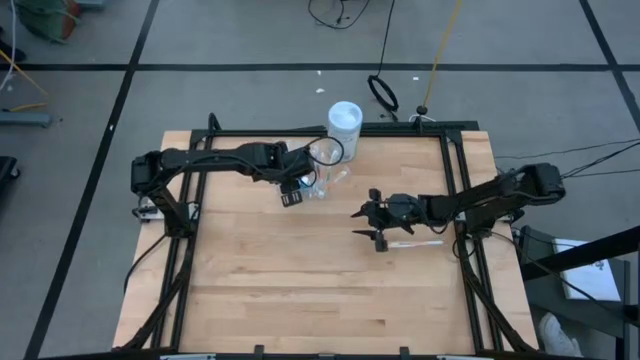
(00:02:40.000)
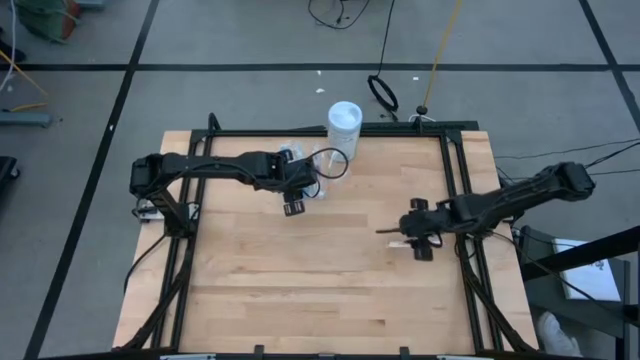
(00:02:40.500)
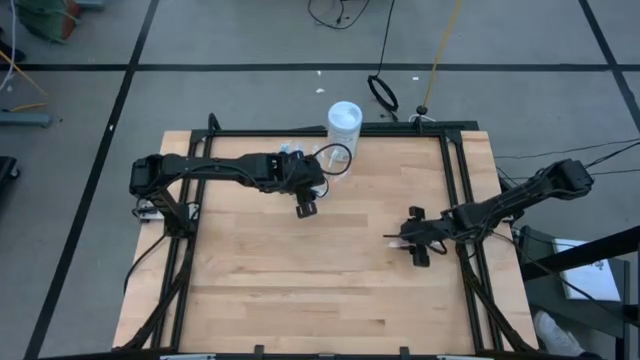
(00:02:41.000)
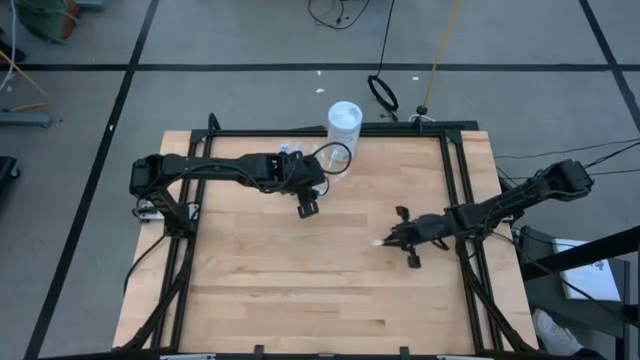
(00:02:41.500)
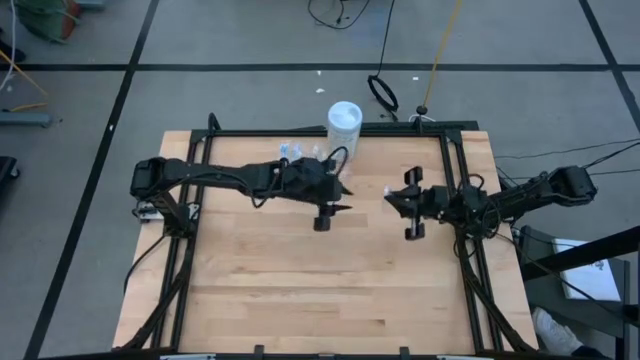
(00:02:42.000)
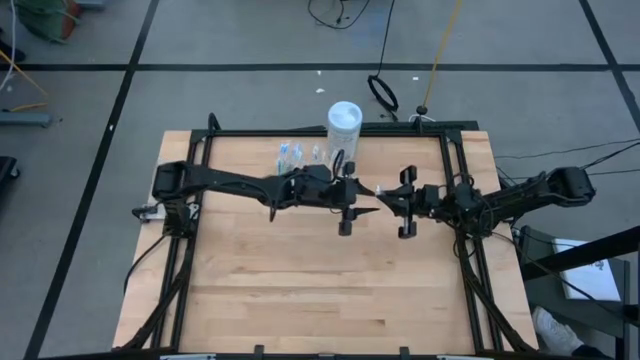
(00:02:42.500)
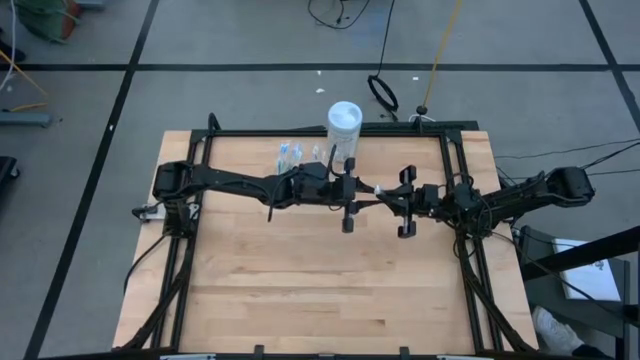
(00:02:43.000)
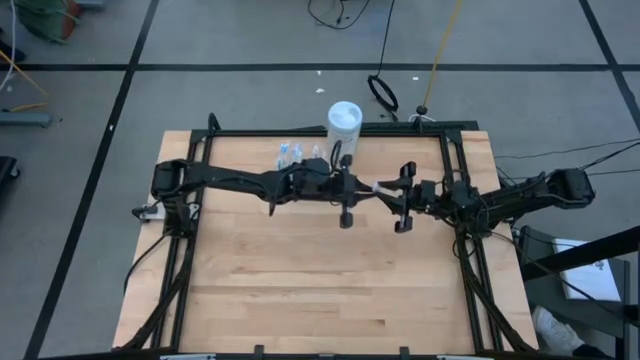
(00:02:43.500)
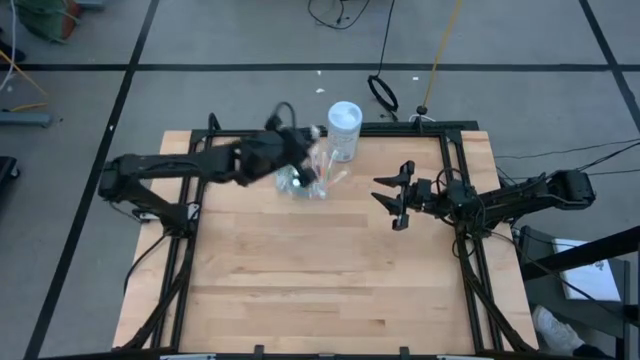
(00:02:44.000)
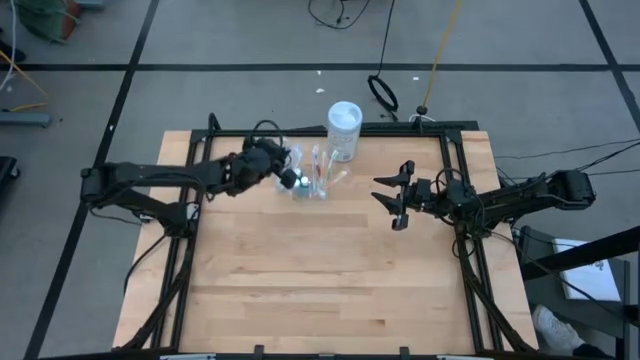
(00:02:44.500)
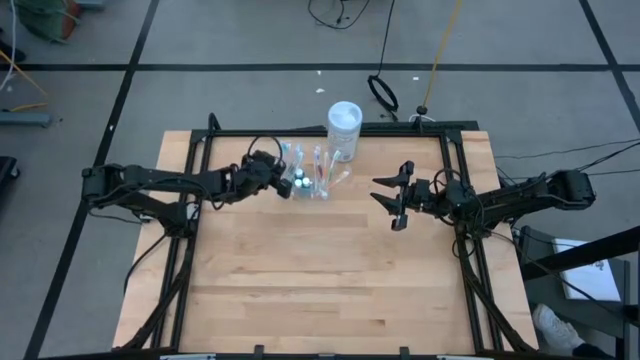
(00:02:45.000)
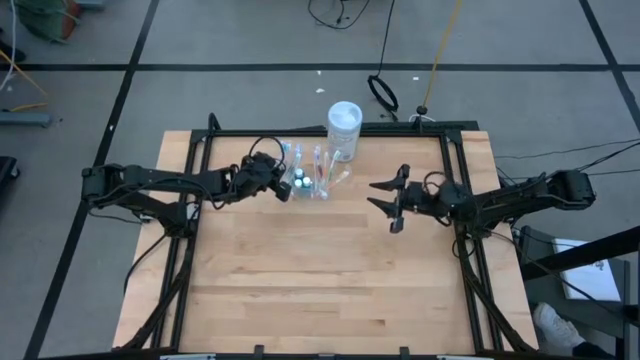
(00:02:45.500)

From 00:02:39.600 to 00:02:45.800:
Task: Pick & Place toothbrushing station
Put the orange toothbrush into the transparent organizer

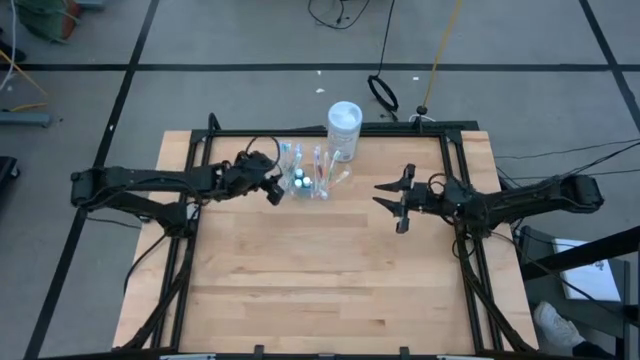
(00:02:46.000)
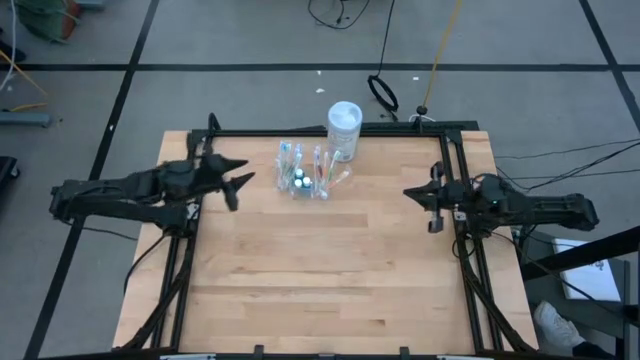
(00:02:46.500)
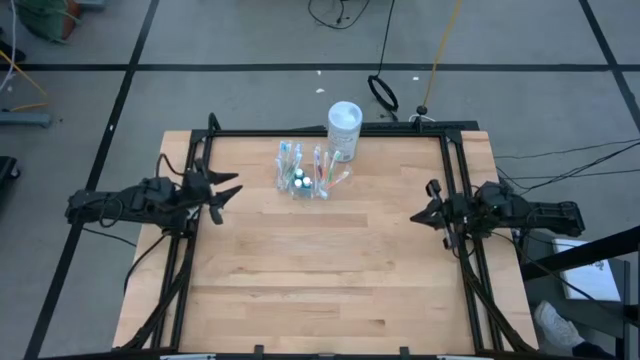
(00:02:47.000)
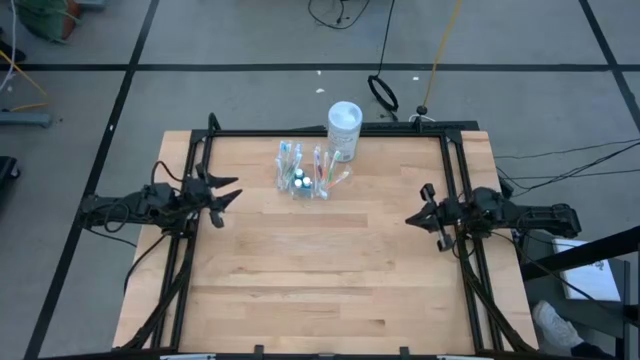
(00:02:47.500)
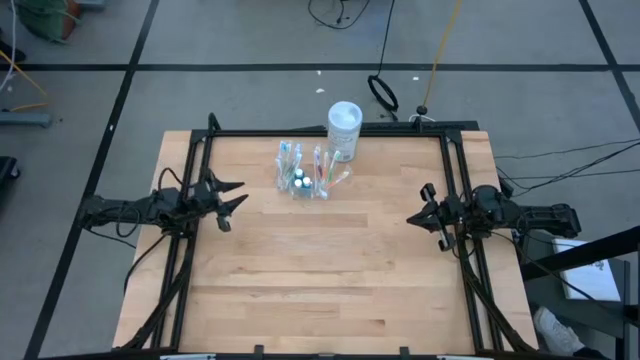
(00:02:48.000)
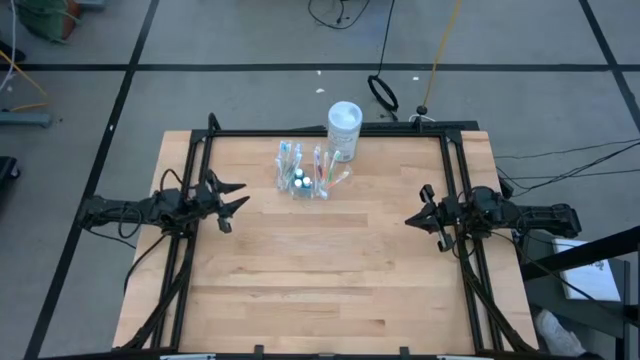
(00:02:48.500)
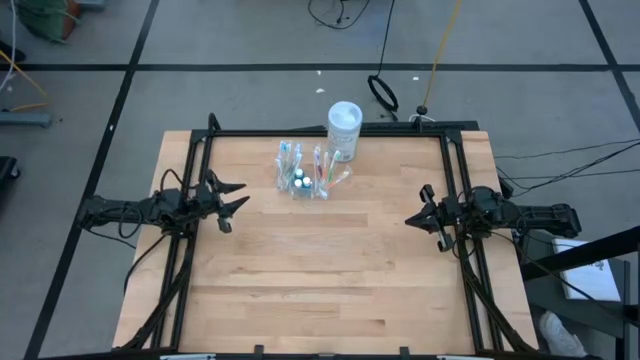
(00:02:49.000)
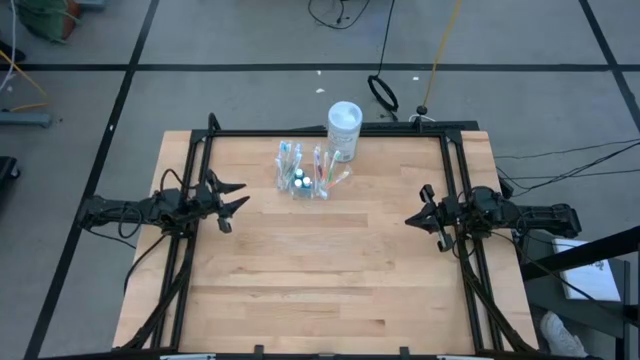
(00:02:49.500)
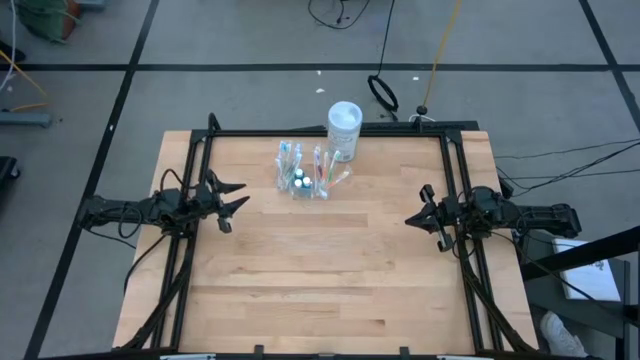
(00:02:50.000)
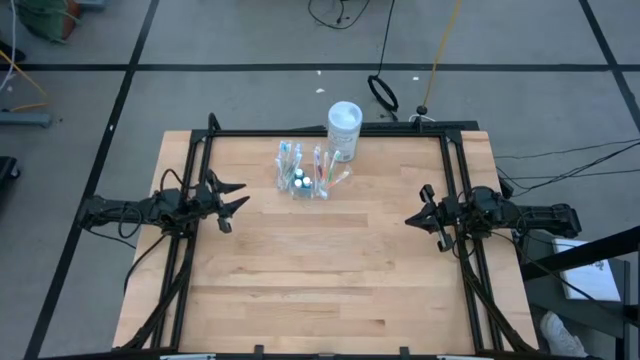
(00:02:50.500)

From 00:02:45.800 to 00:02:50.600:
Return to Home Position

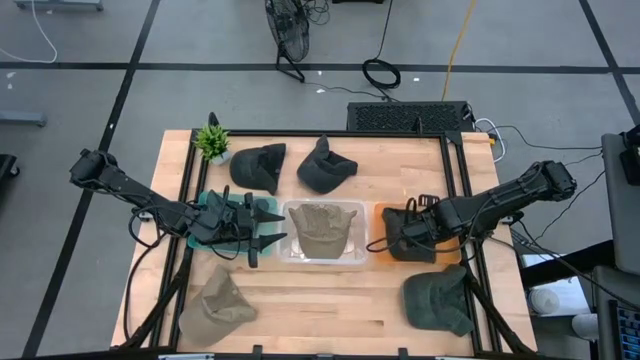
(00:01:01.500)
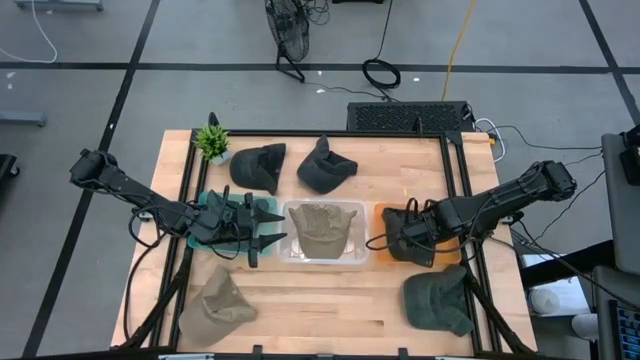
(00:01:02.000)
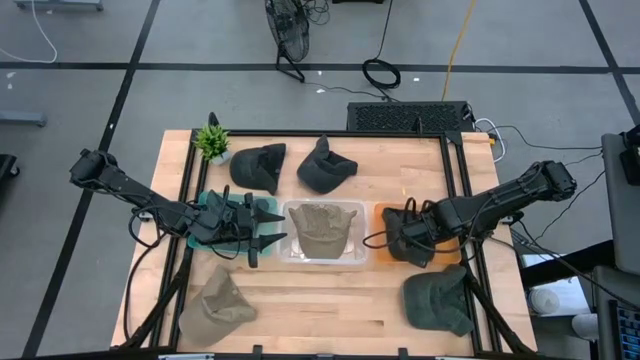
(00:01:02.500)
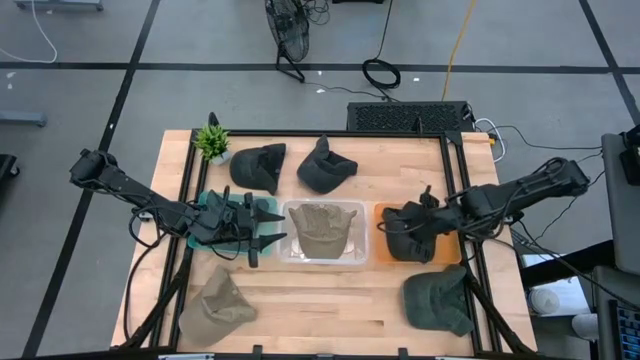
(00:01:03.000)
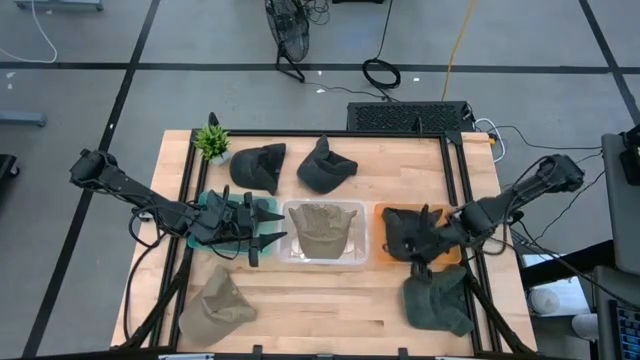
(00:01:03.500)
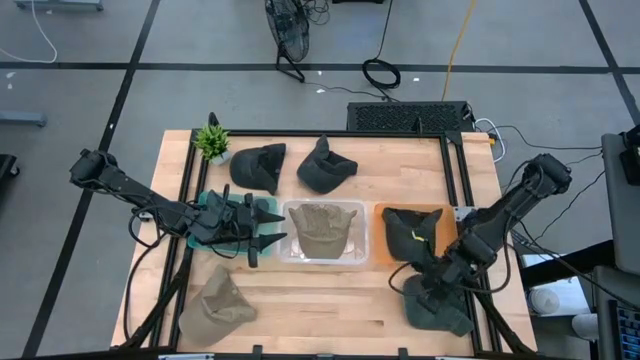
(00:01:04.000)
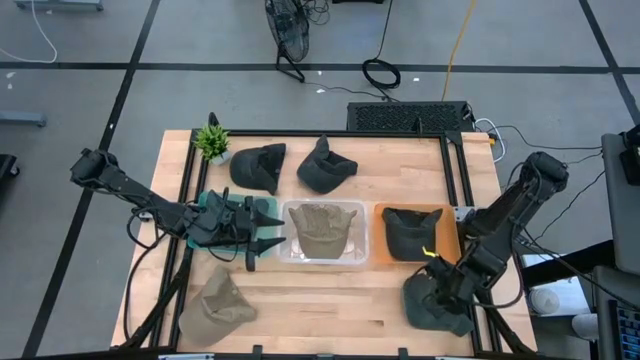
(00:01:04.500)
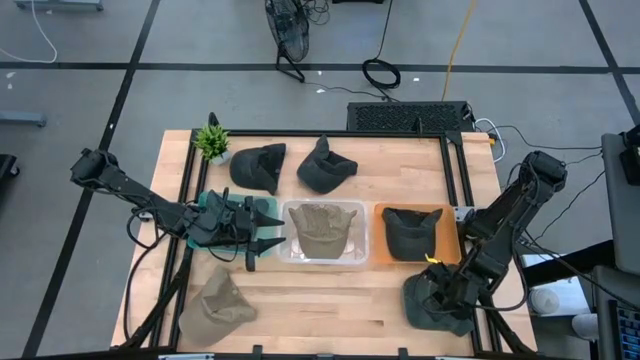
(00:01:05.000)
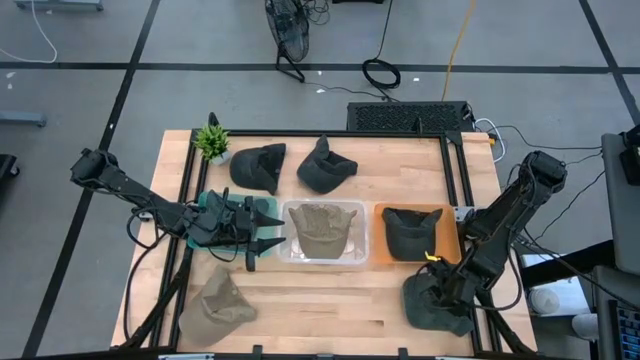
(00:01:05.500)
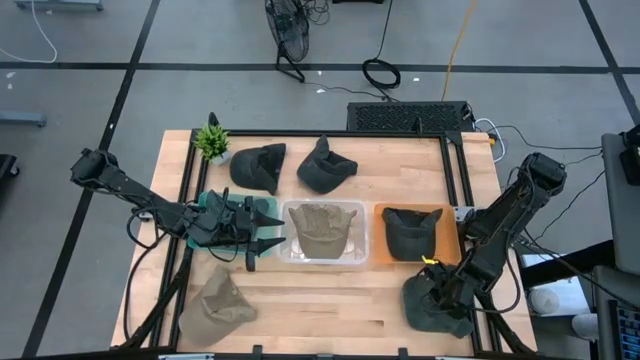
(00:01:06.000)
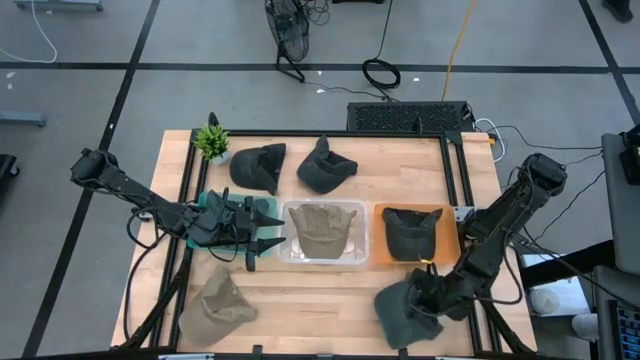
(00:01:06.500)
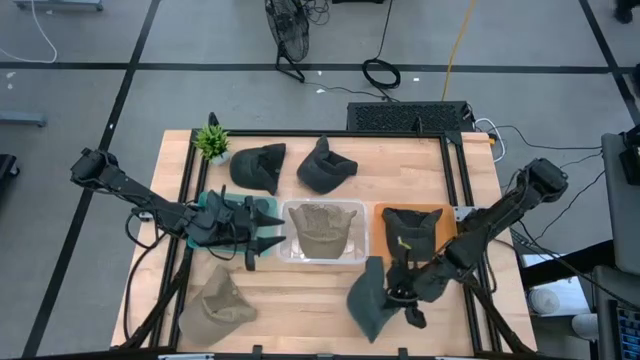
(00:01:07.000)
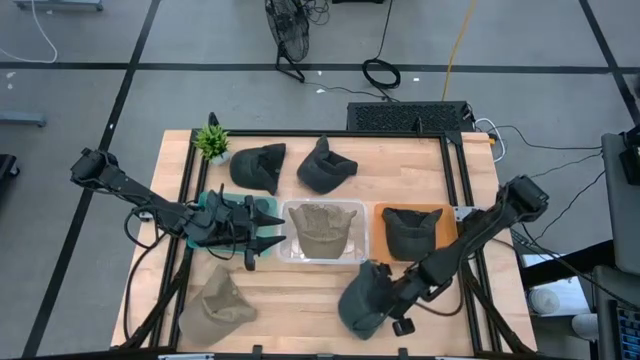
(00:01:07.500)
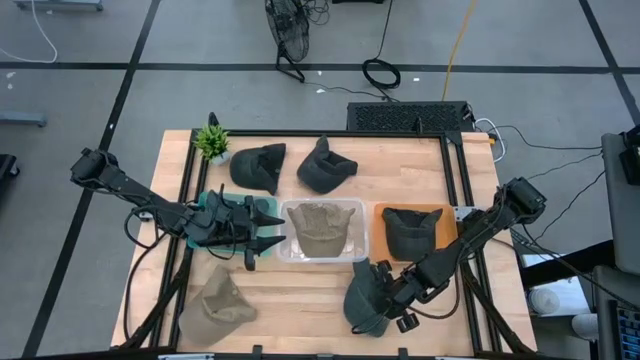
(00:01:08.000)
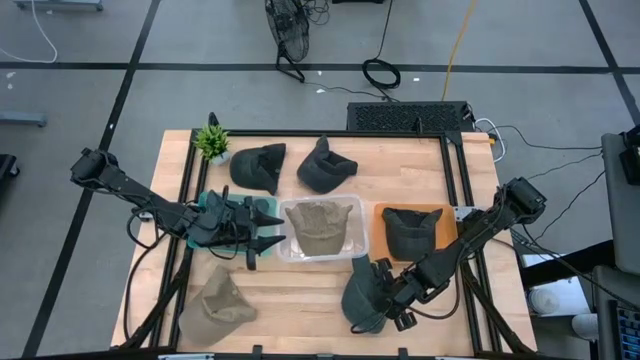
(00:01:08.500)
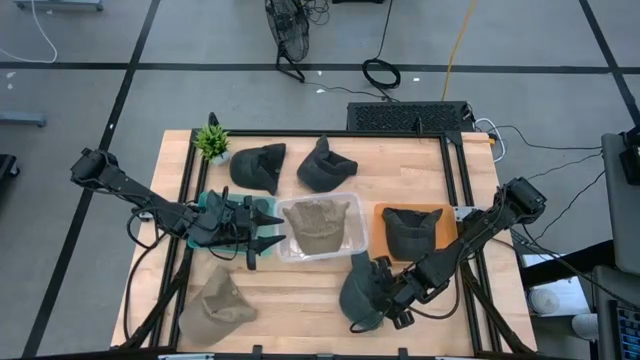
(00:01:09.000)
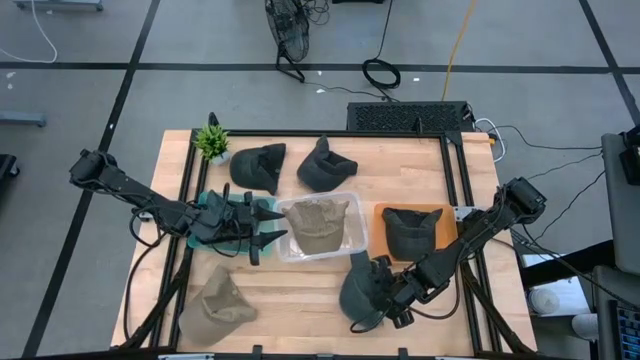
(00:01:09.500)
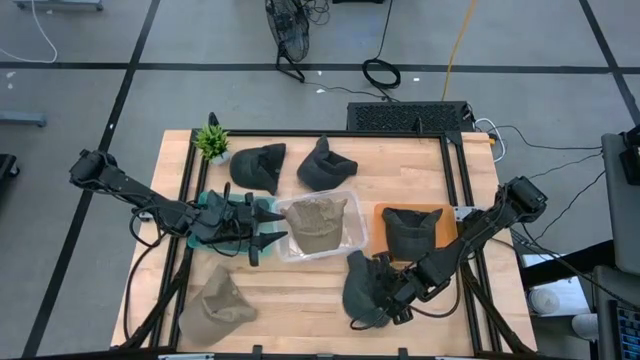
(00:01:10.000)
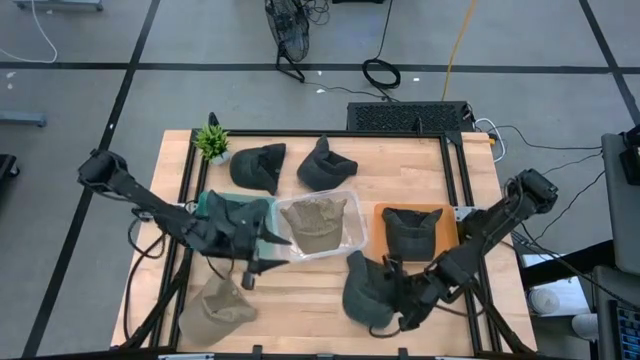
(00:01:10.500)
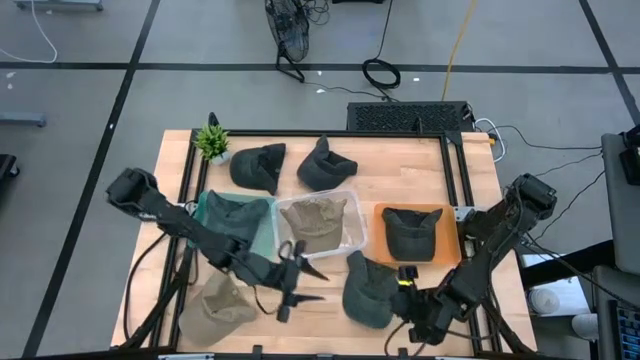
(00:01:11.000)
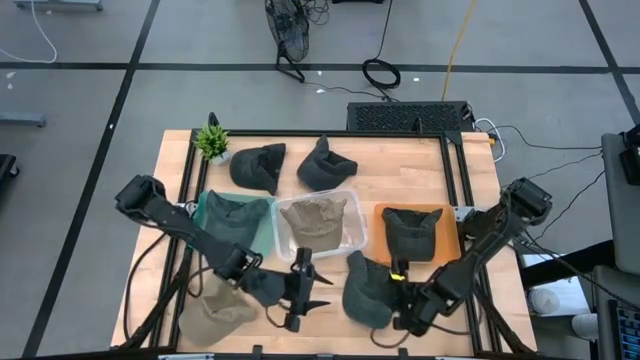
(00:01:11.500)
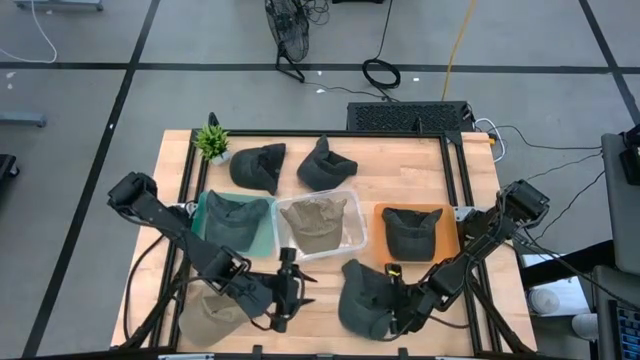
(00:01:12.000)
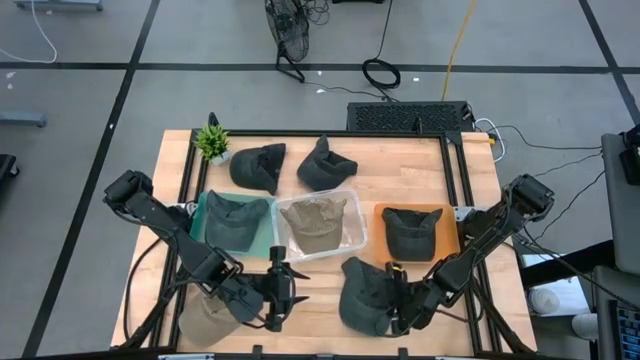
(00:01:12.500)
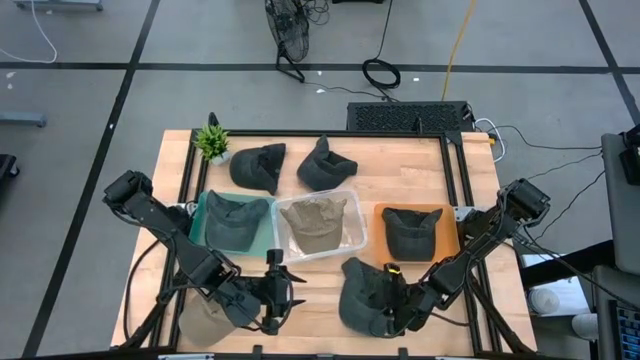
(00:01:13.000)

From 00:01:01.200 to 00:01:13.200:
Task: Pick & Place hat
Put the green cap into the green bin
